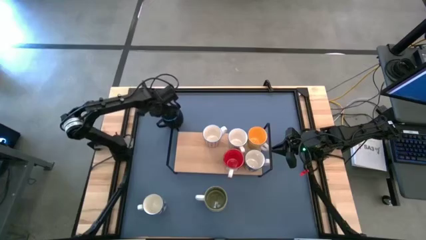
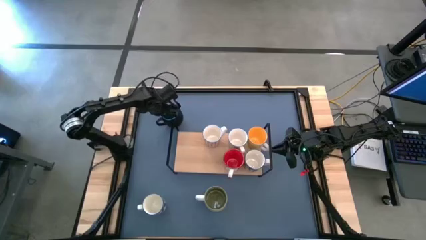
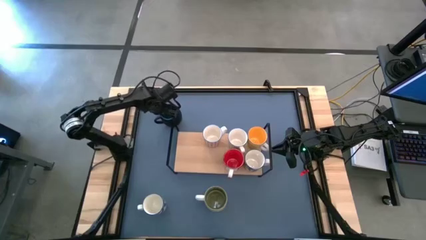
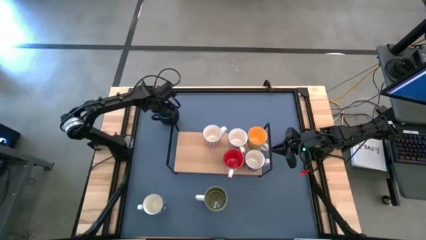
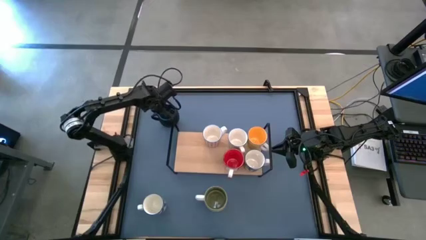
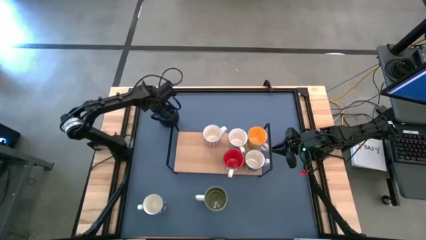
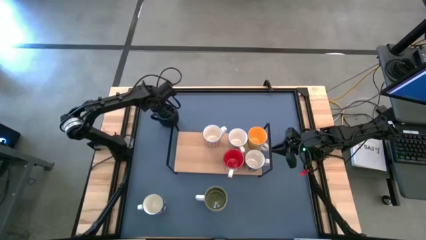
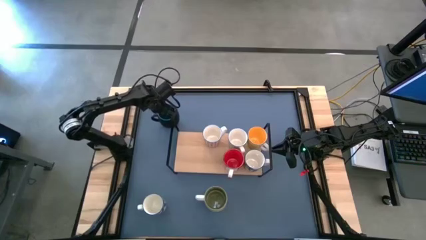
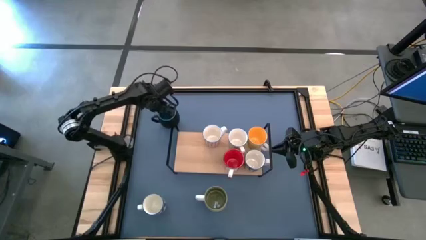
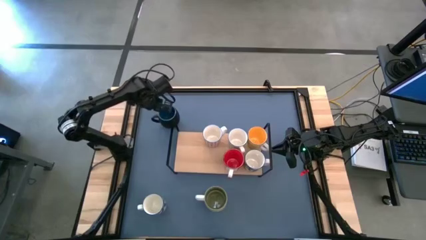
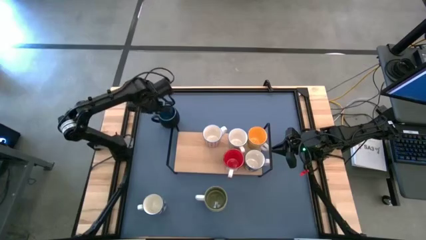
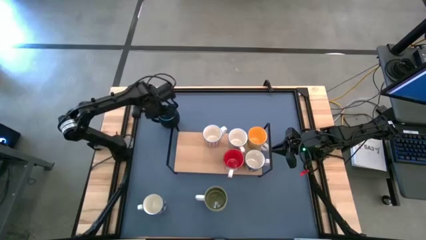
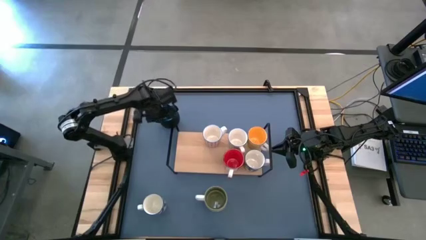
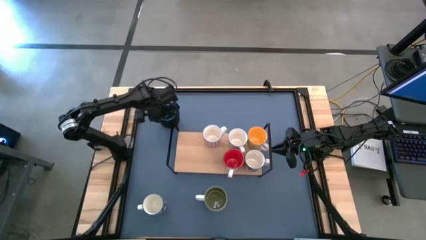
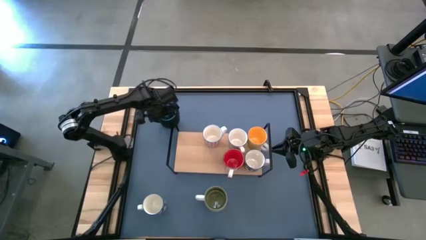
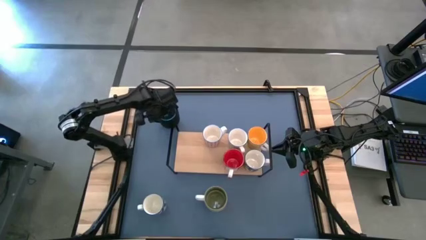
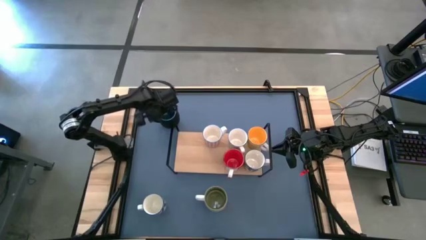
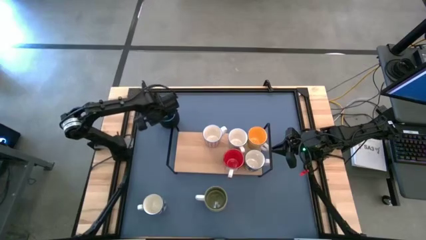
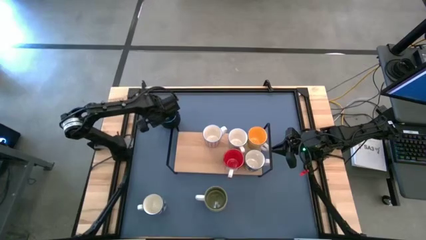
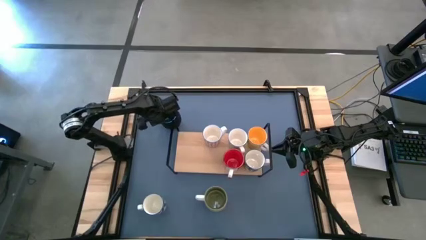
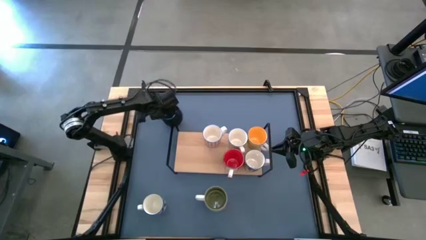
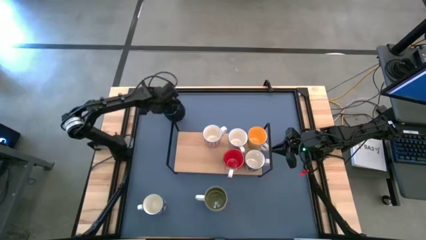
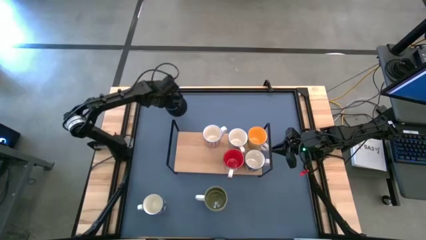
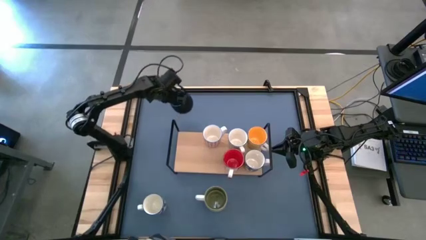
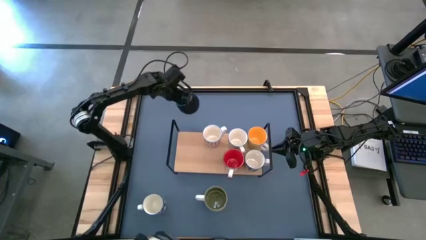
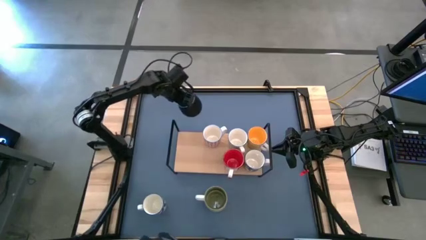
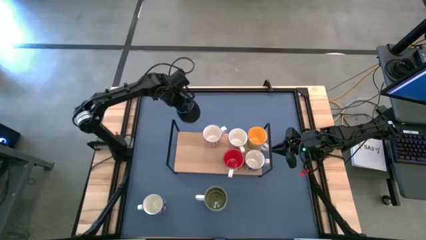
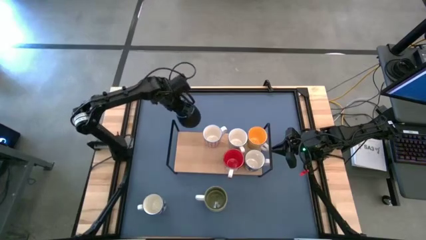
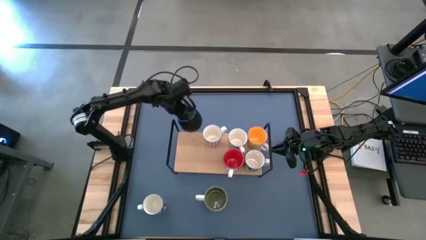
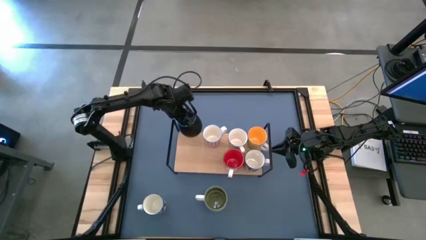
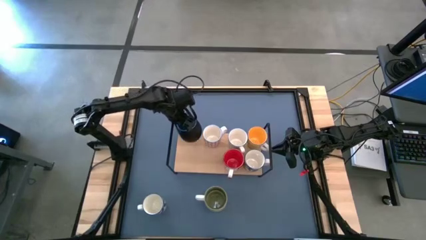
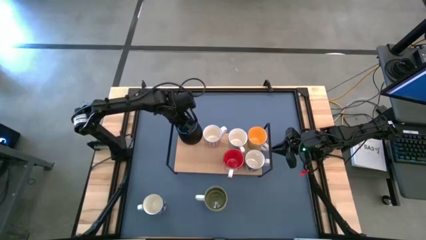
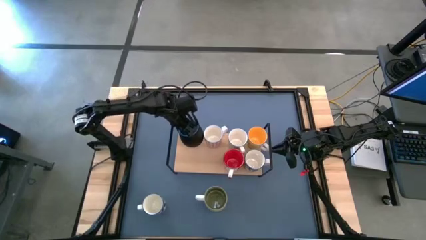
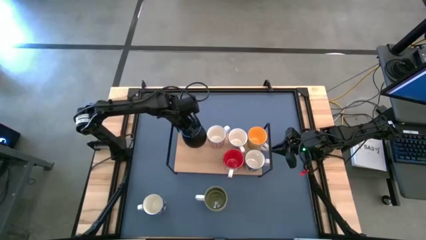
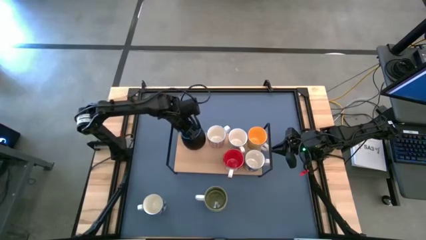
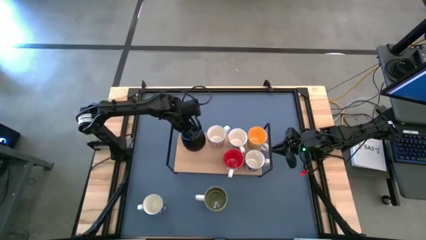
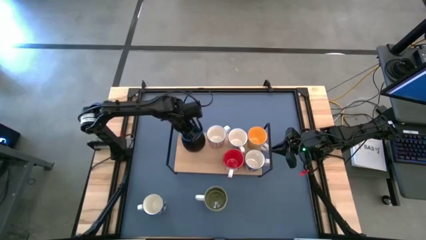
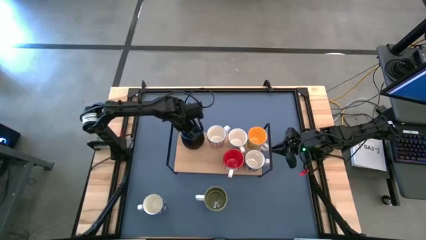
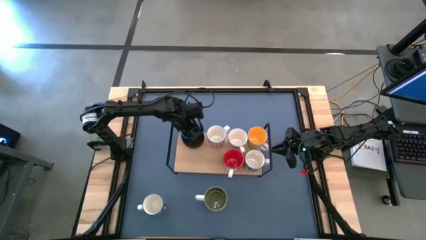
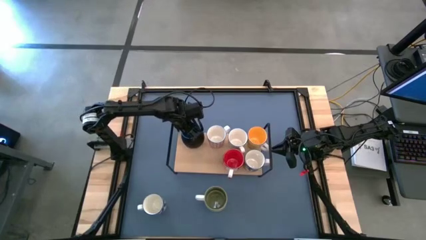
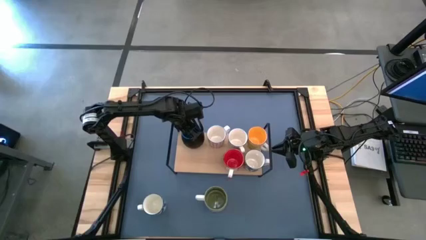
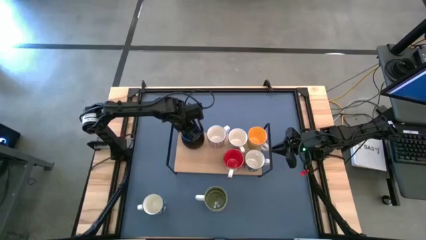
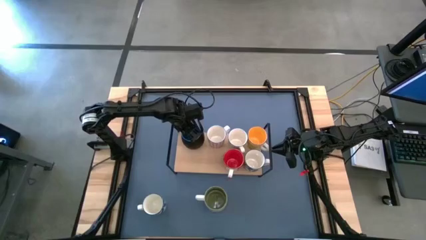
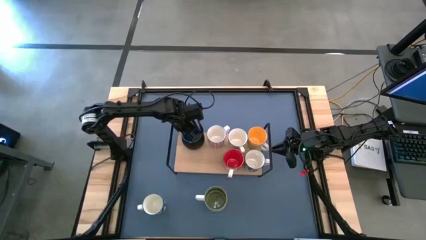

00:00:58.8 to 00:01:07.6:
Task: Place coffee mugs
Put the black mug on the shelf

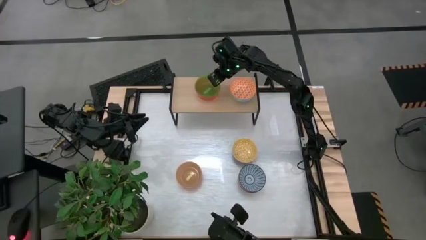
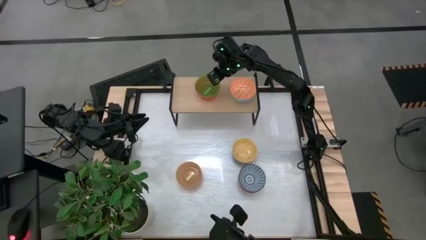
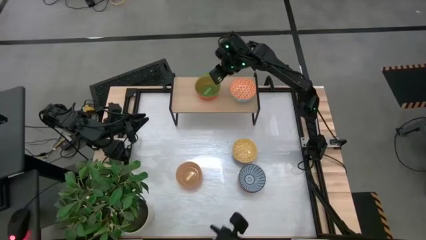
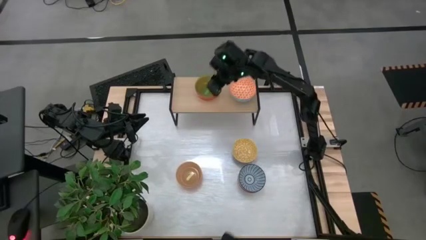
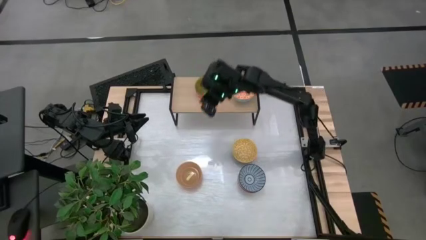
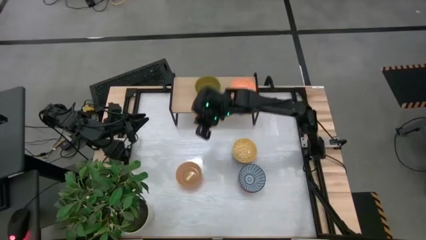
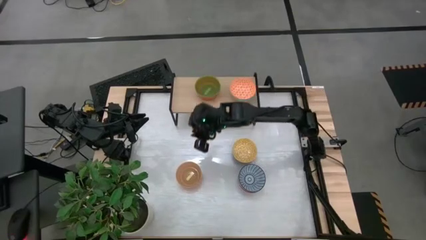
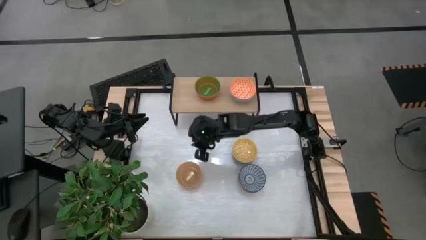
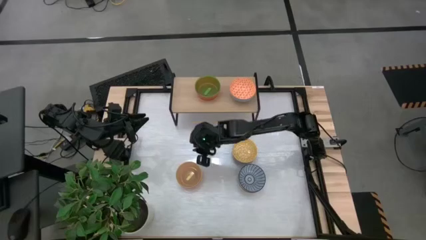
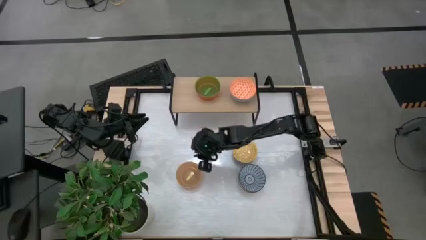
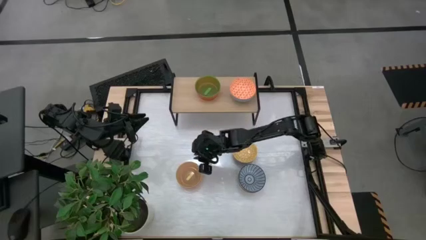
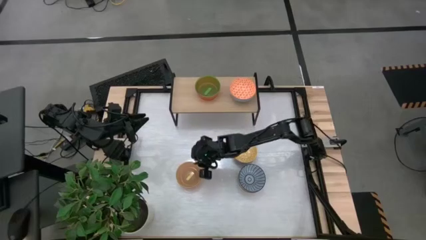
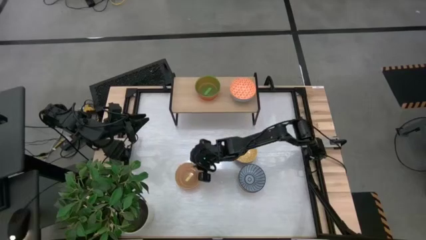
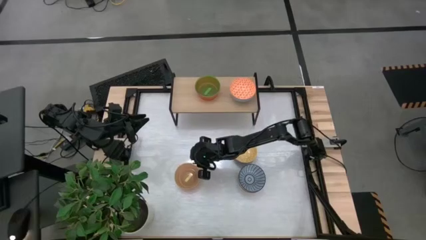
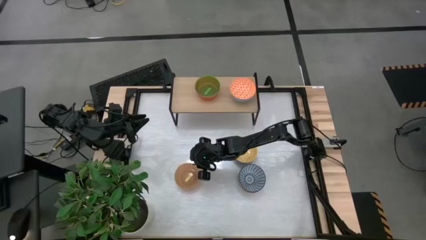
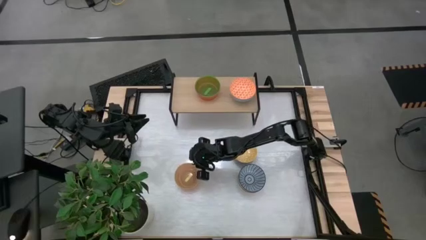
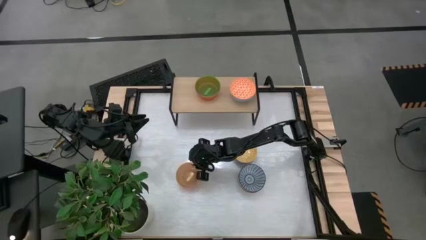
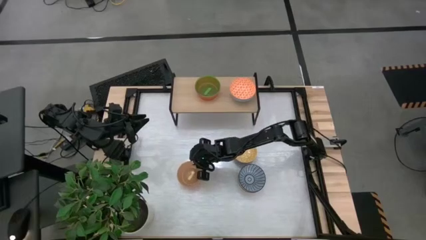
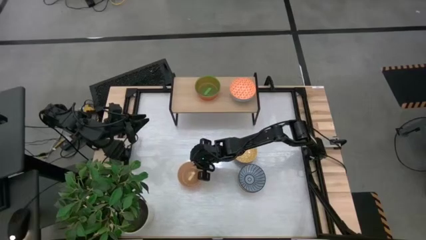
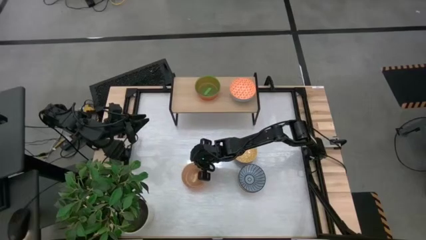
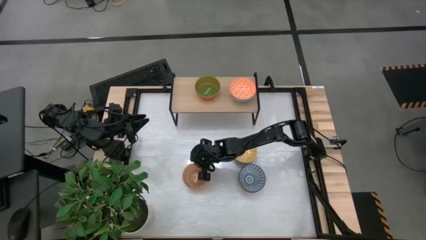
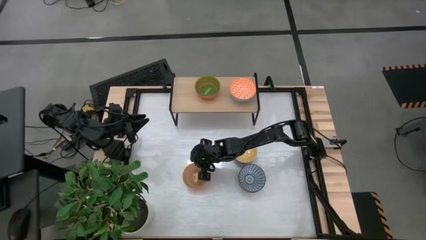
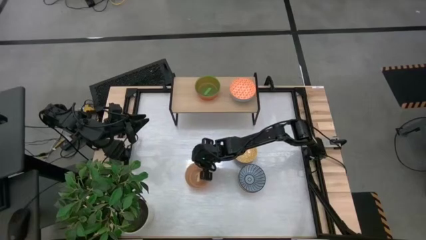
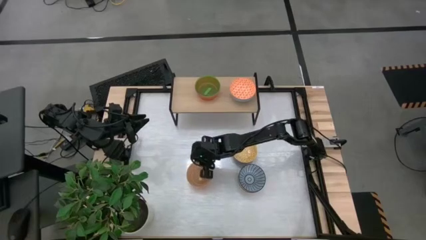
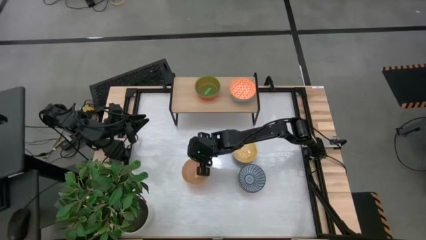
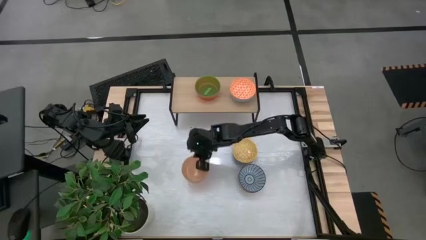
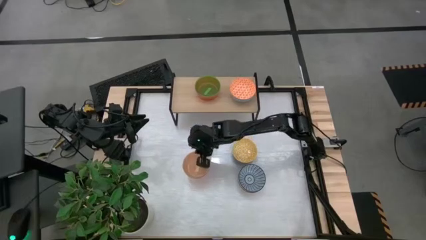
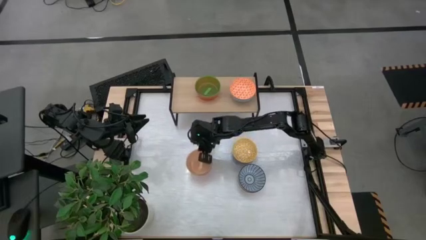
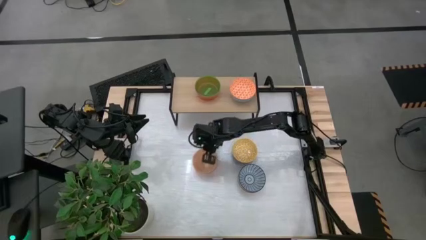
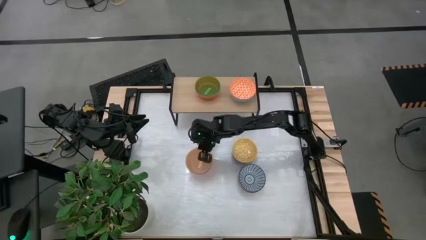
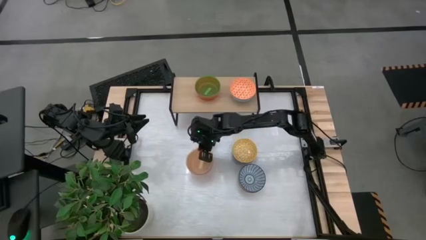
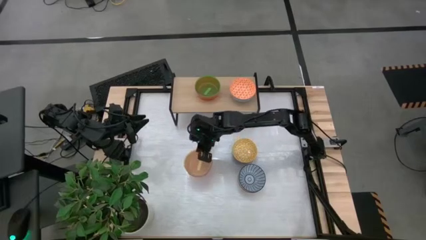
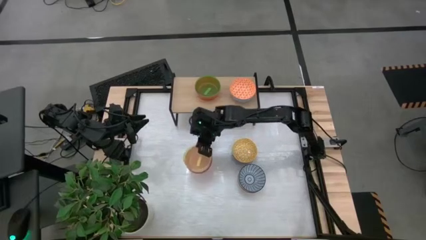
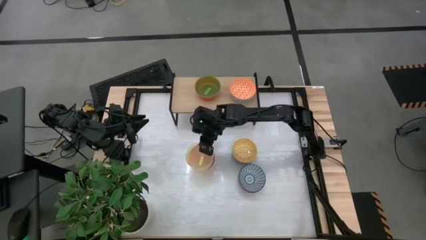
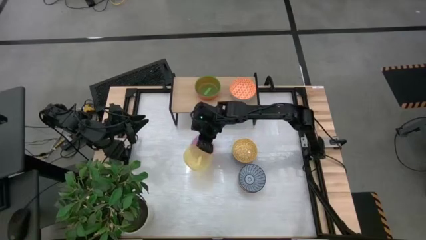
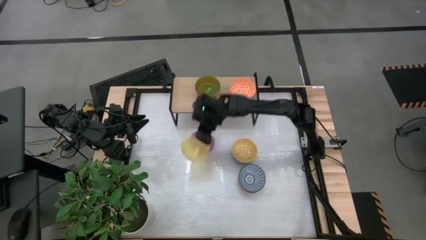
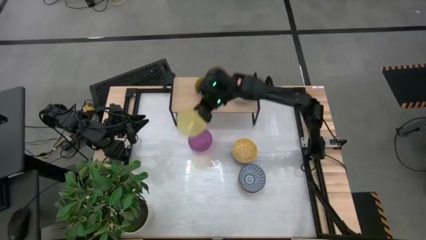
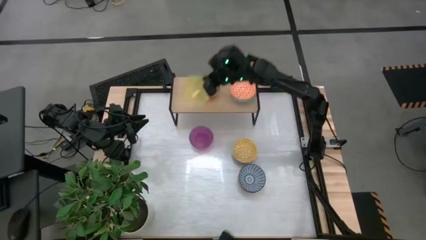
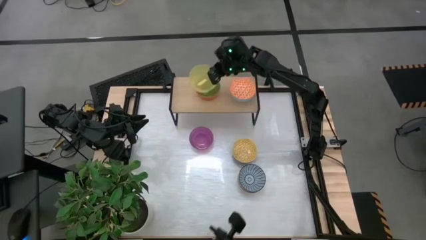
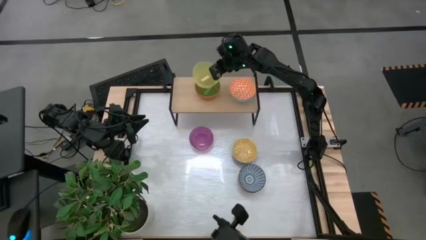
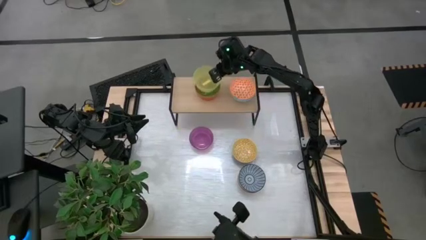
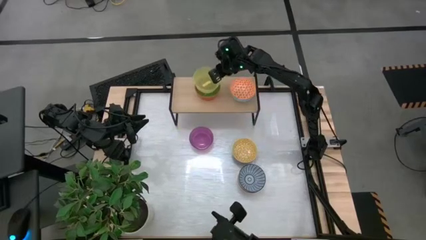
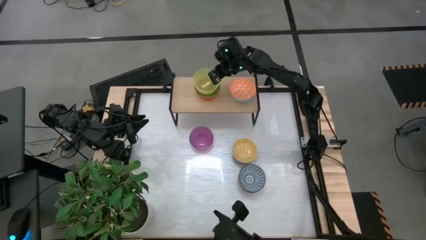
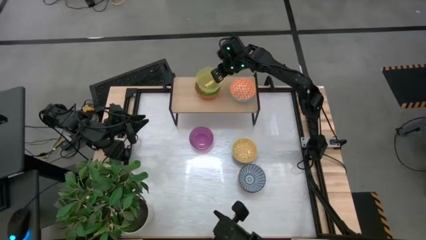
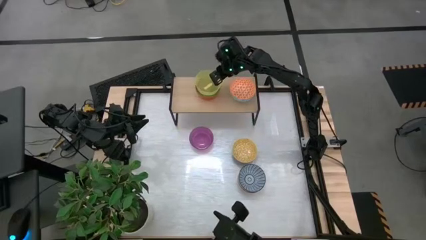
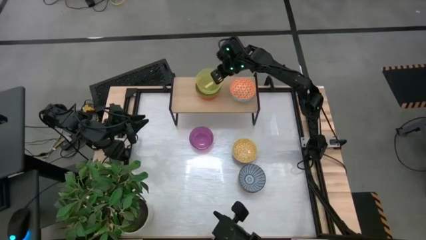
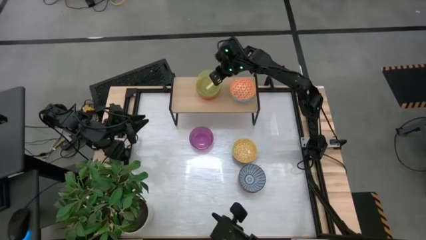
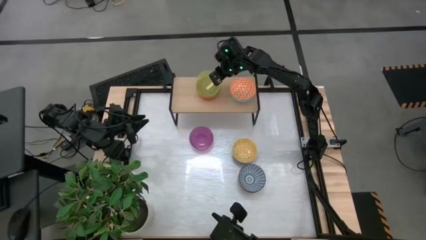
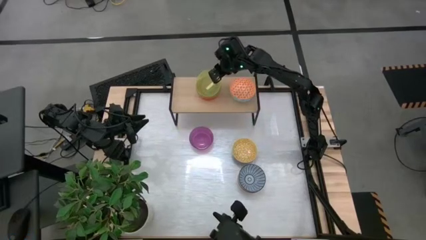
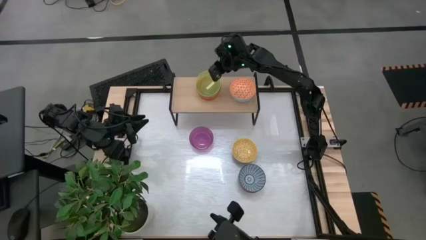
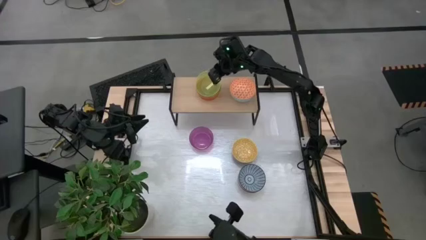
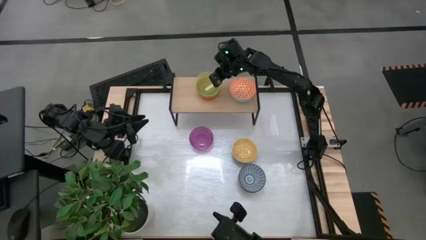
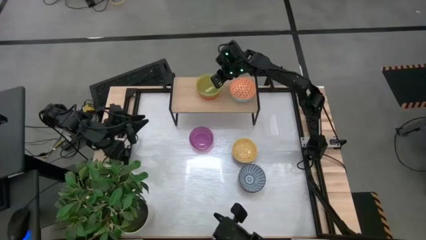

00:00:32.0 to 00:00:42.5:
Task: Place and stack bowls onto a shelf
Stack the yellow bowl on top of the green bowl on the shelf
